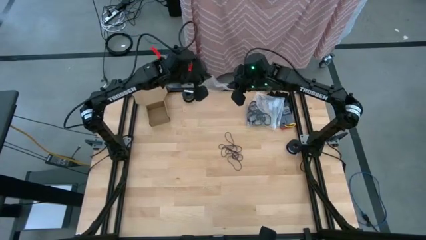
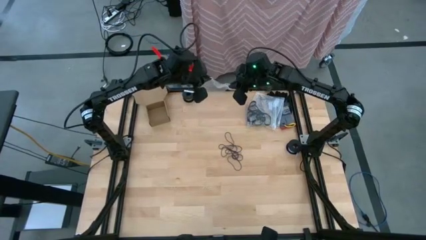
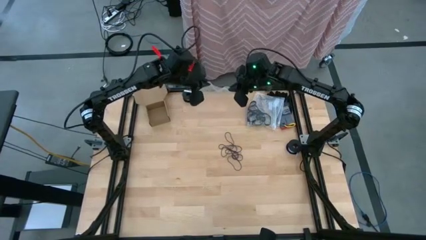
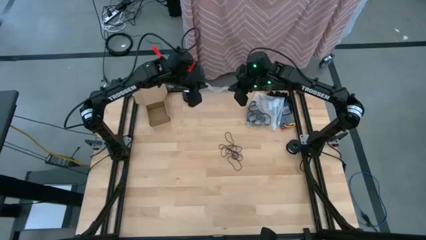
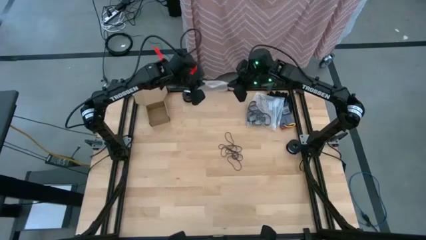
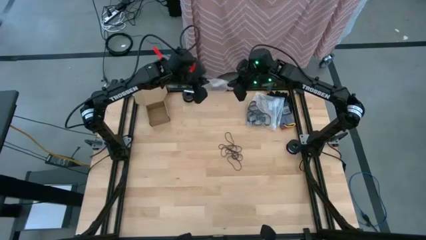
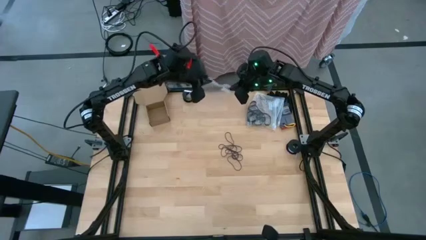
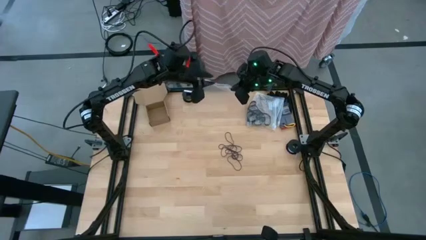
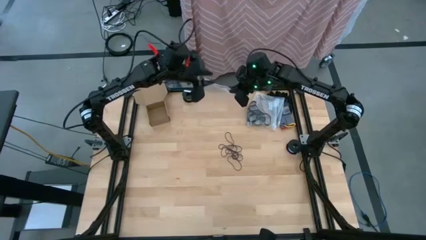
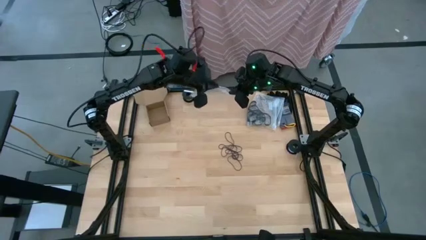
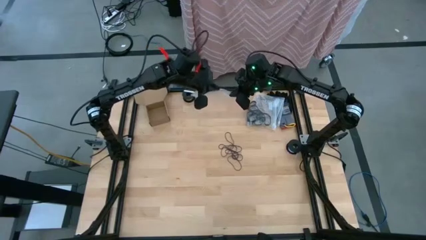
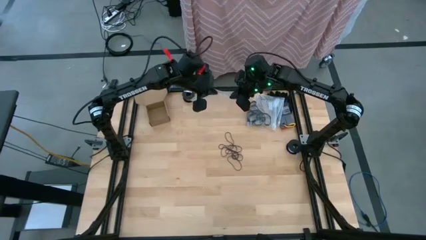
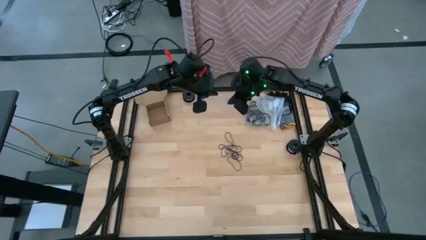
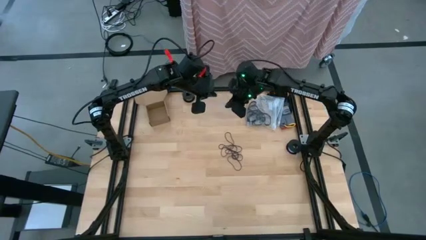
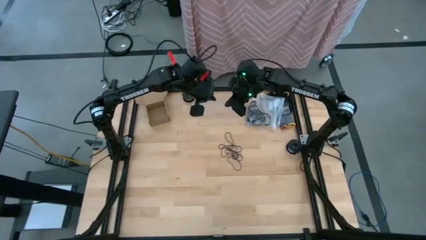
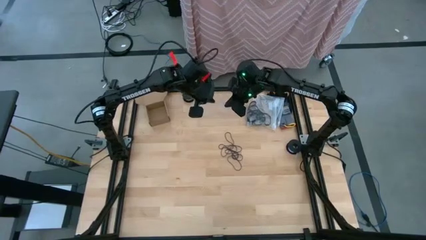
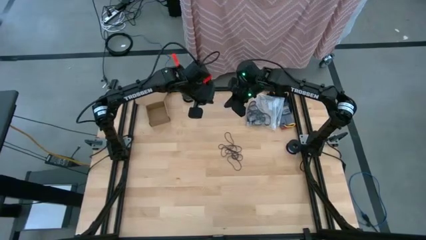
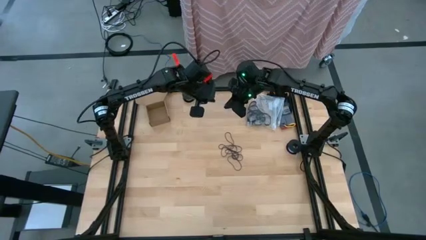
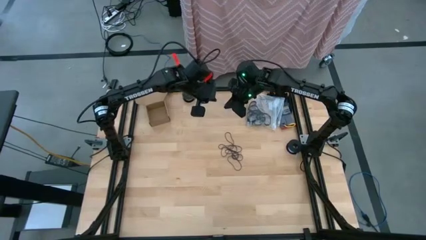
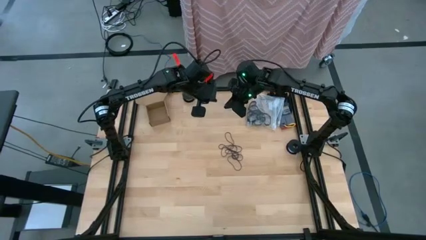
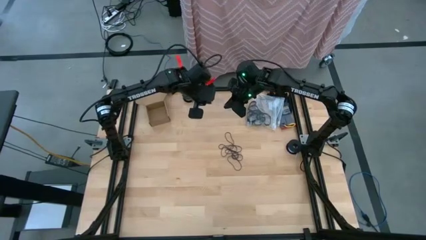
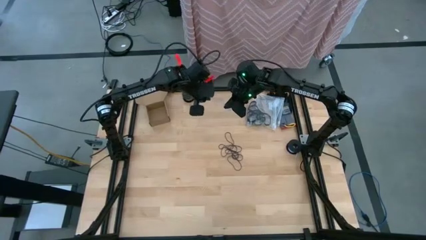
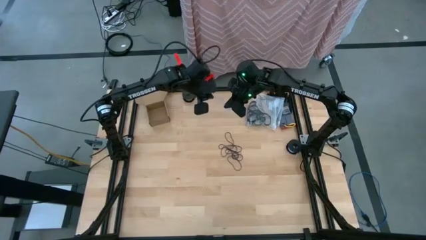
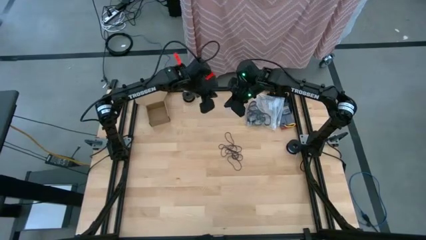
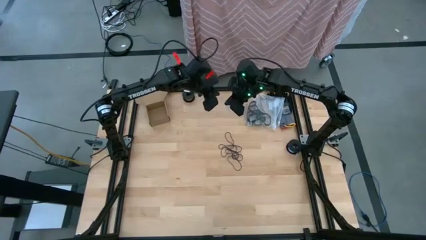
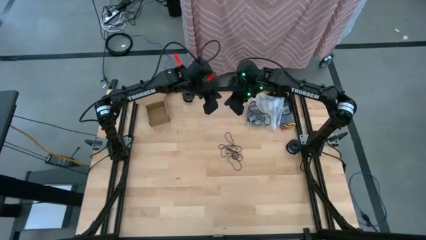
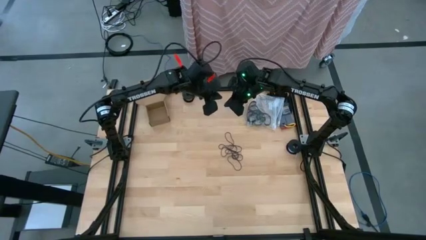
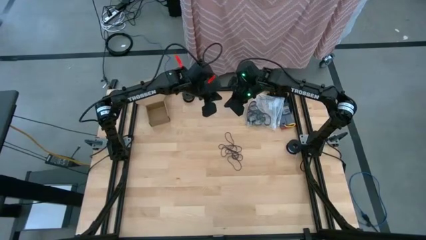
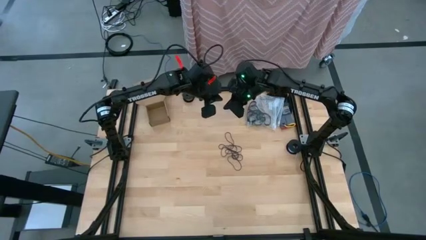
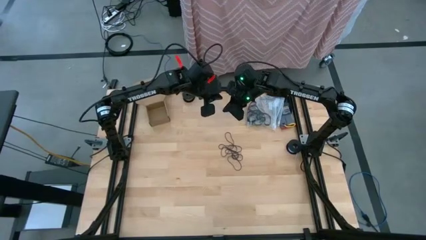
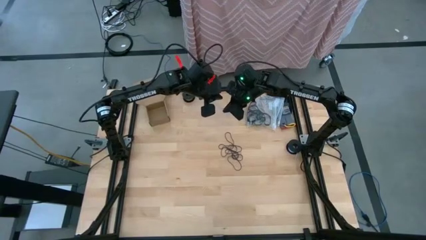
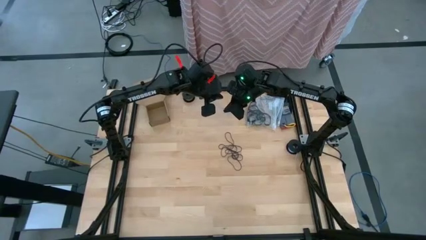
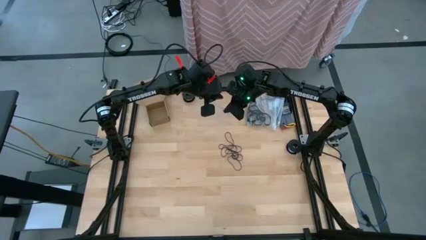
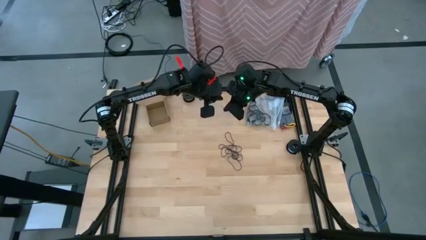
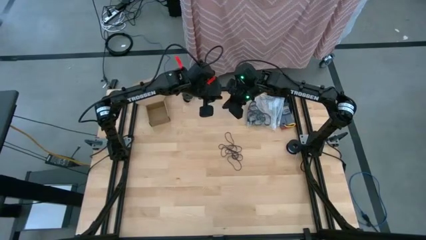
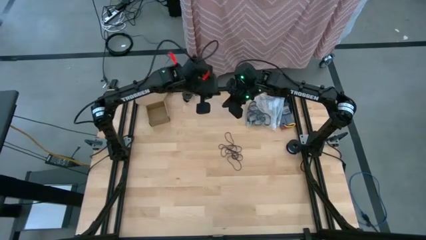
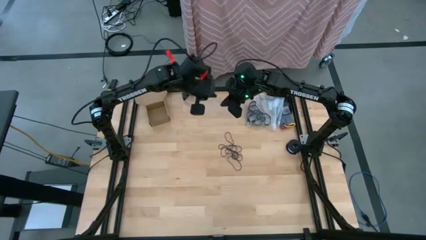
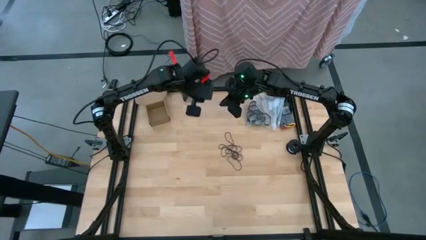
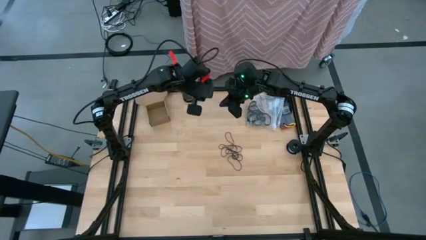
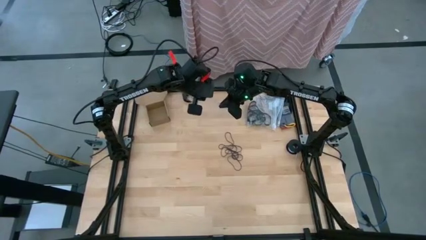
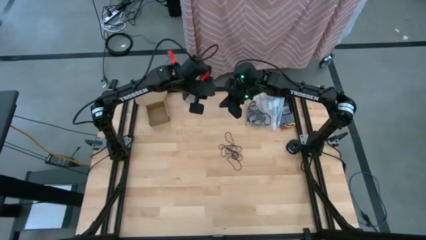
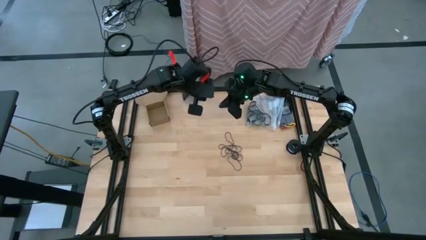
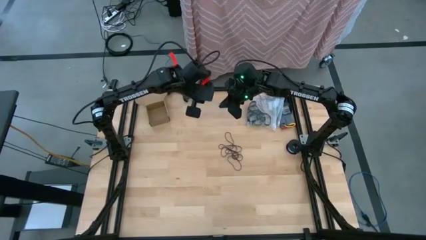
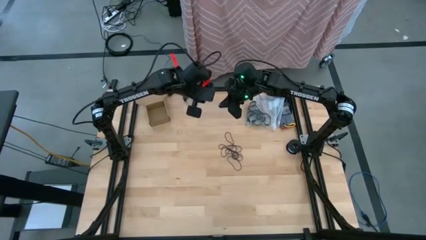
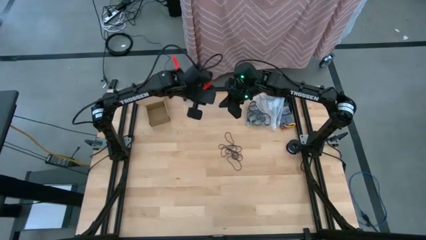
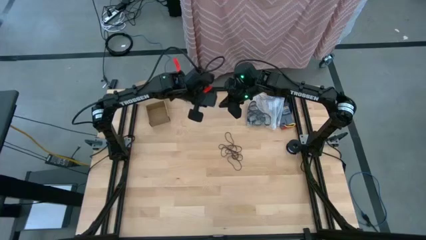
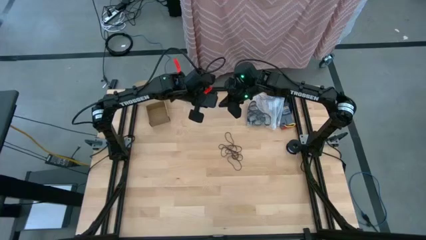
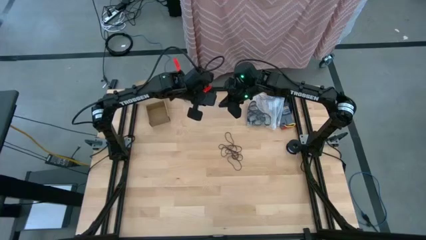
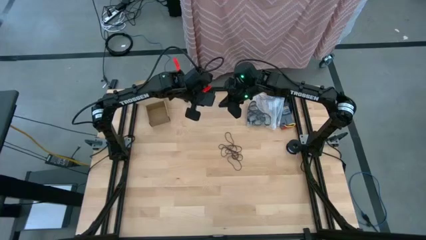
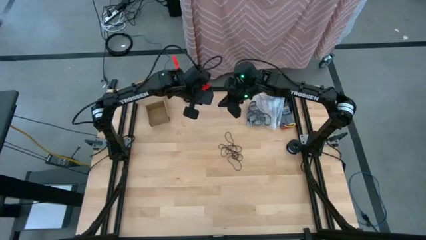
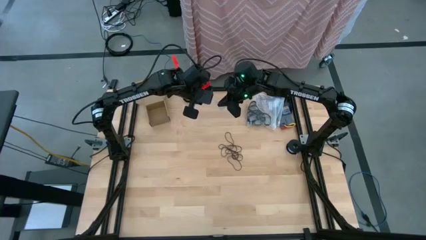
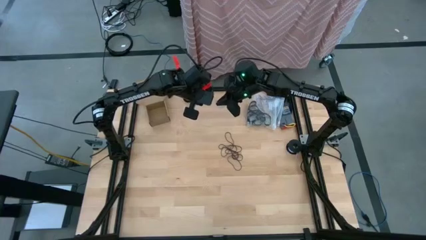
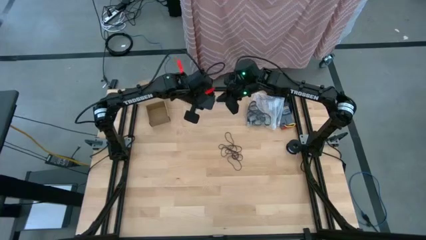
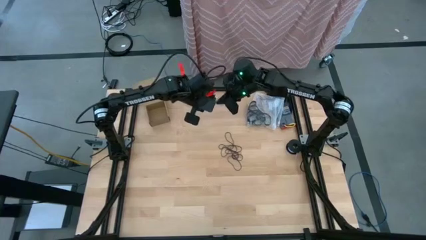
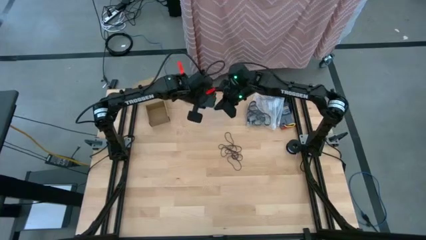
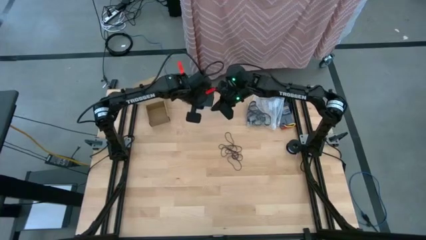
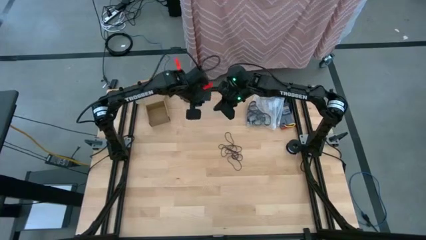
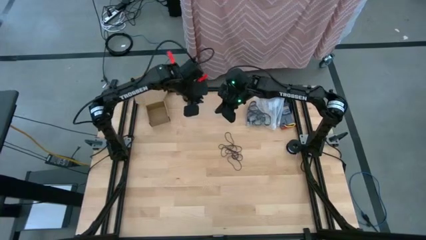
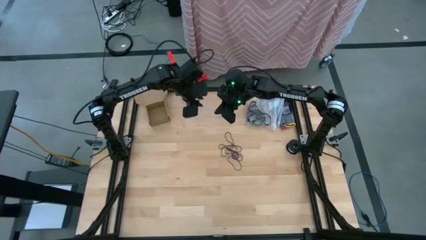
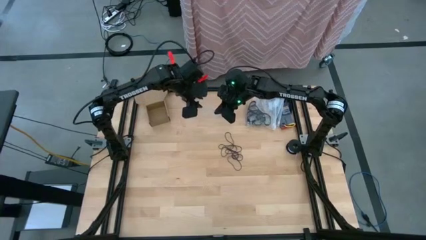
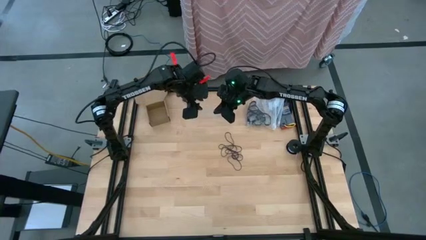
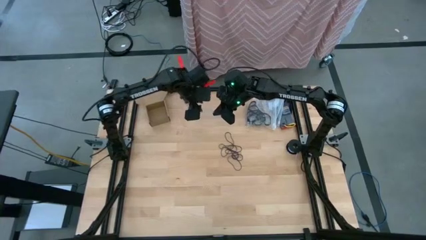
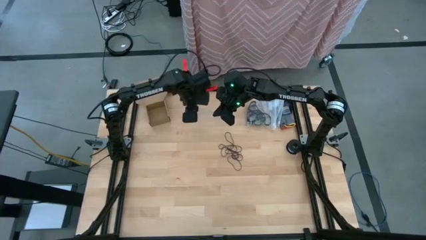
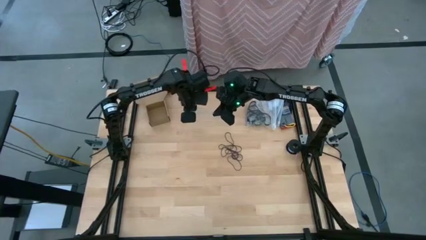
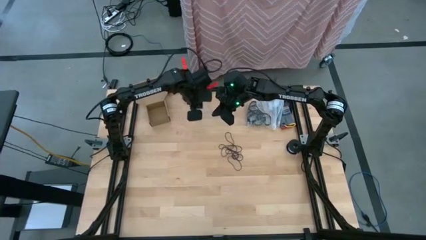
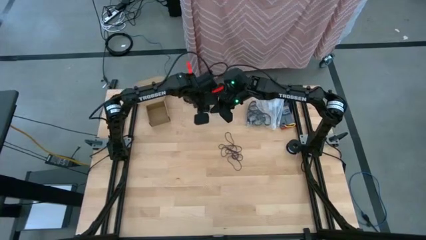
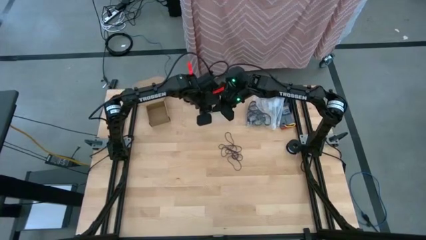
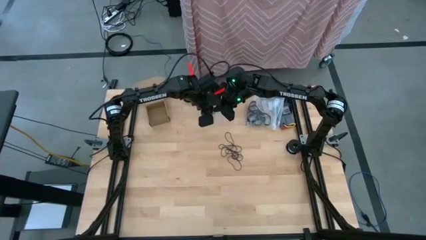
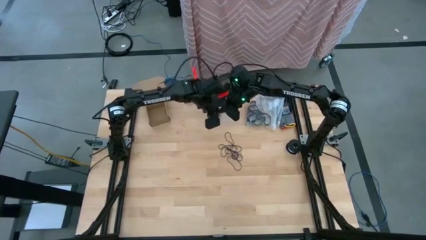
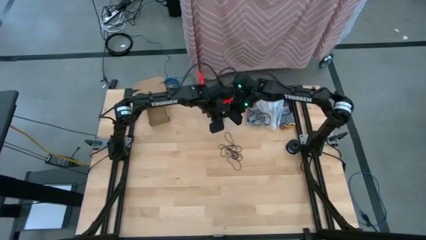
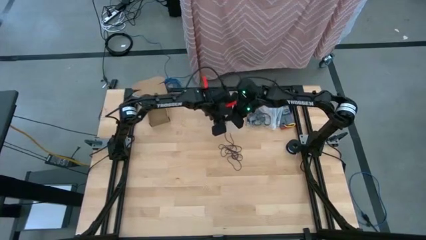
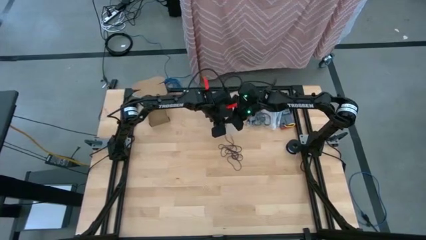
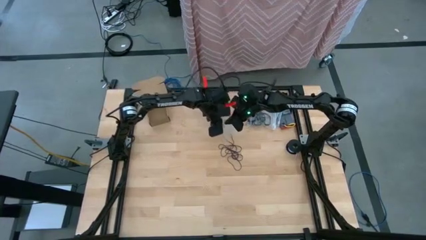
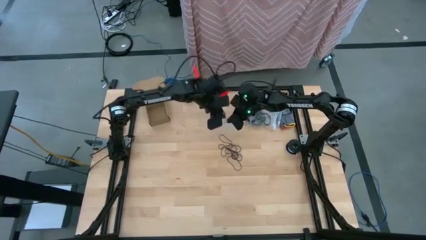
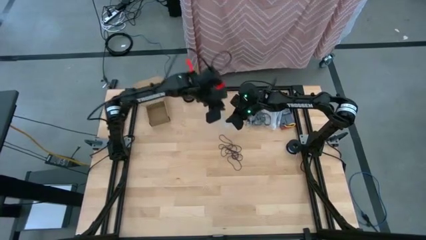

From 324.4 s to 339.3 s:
Task: Sort rubber bands
Open the transparent zip bag
